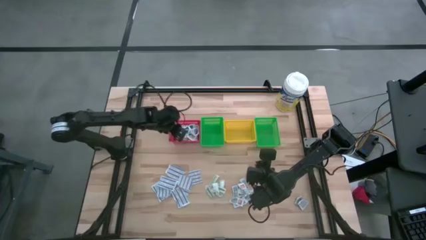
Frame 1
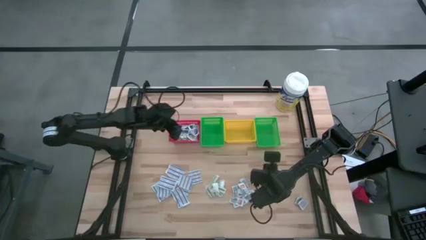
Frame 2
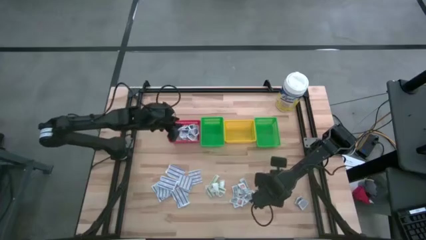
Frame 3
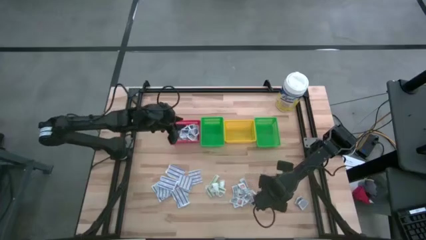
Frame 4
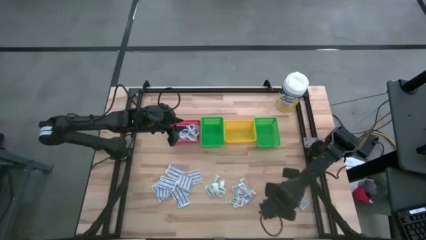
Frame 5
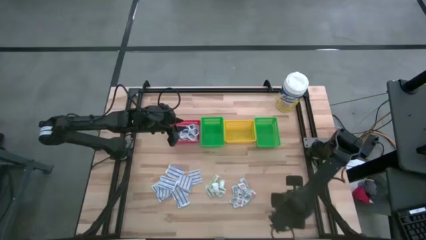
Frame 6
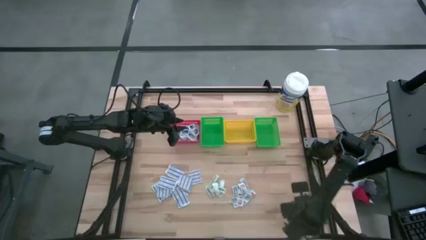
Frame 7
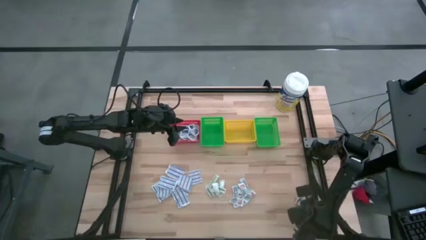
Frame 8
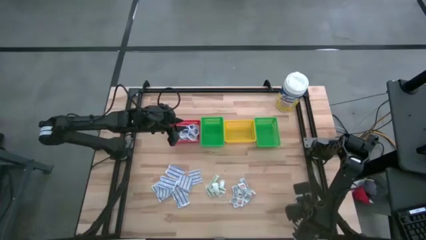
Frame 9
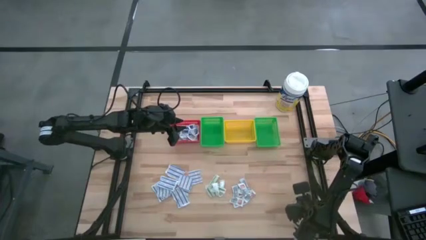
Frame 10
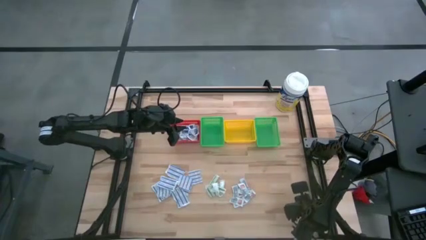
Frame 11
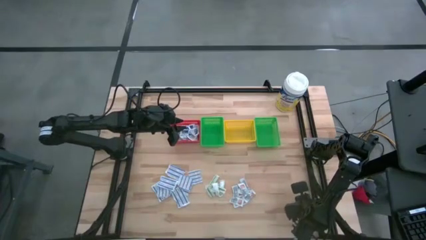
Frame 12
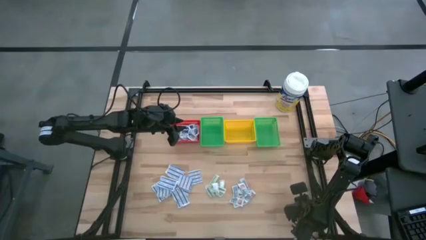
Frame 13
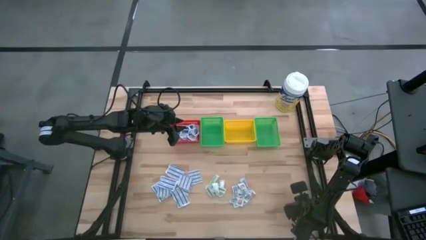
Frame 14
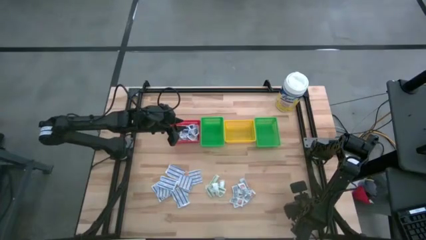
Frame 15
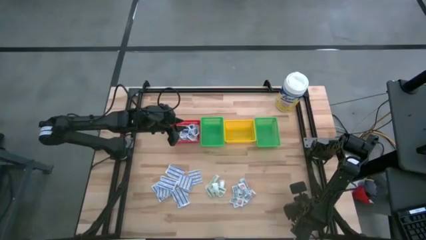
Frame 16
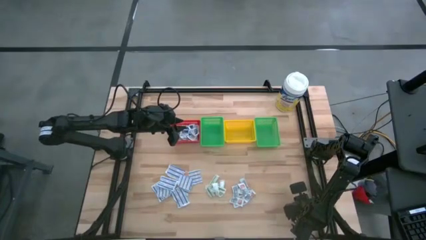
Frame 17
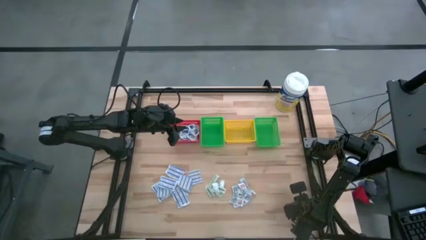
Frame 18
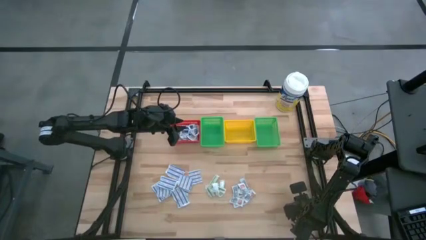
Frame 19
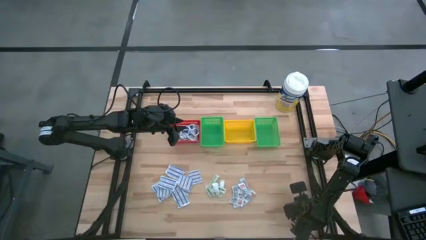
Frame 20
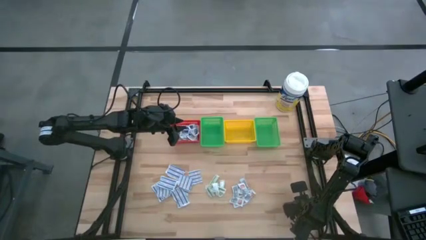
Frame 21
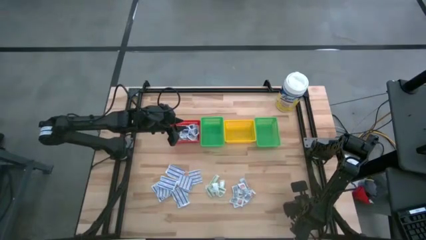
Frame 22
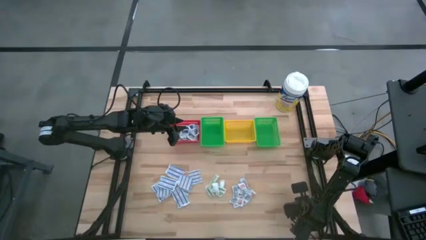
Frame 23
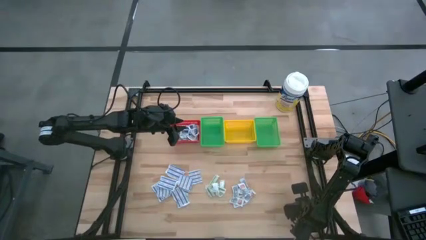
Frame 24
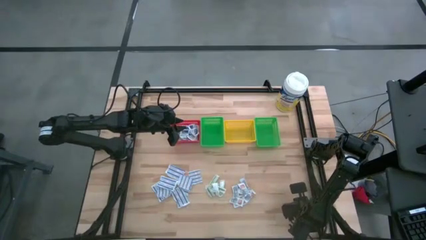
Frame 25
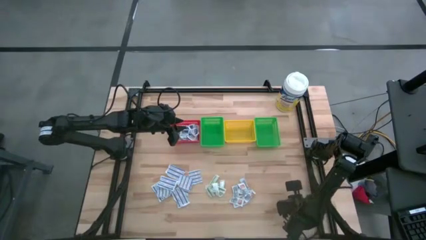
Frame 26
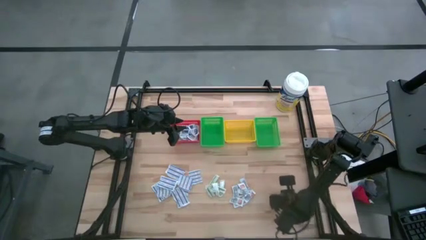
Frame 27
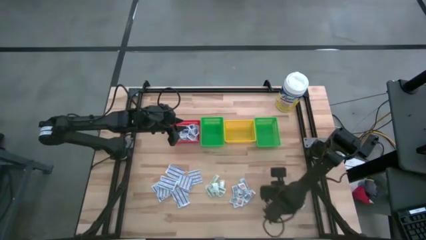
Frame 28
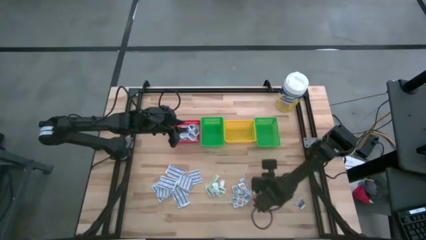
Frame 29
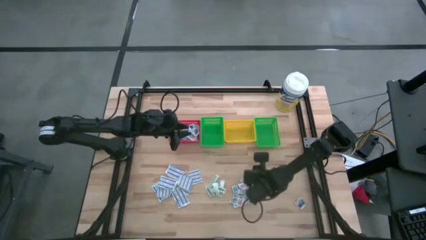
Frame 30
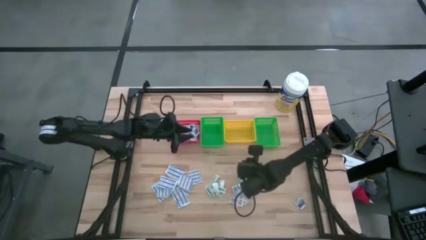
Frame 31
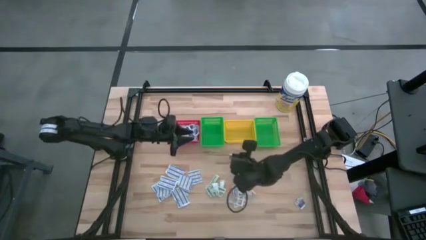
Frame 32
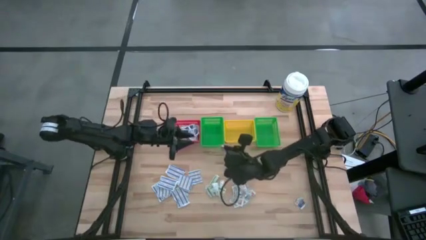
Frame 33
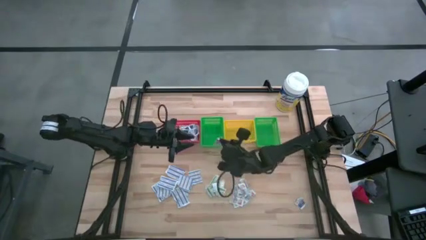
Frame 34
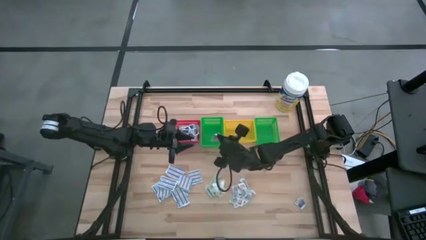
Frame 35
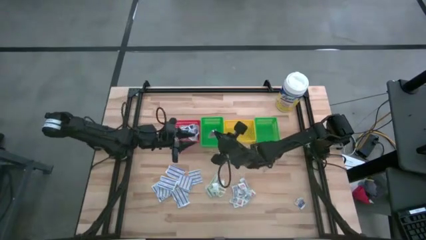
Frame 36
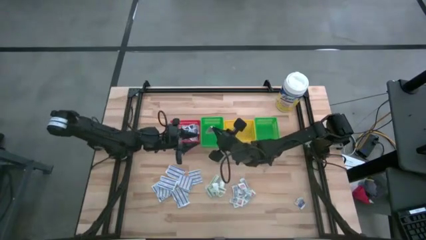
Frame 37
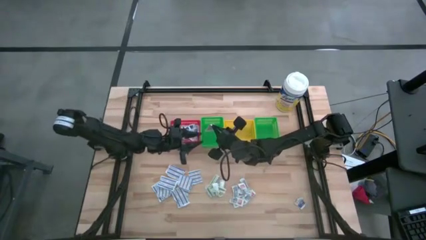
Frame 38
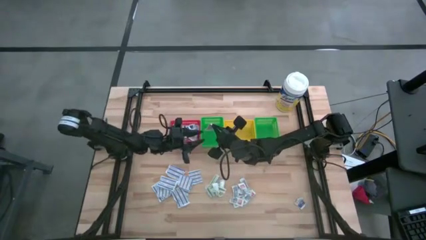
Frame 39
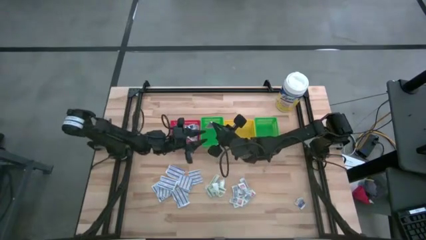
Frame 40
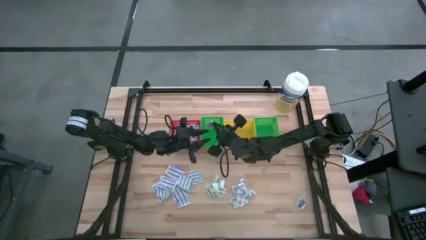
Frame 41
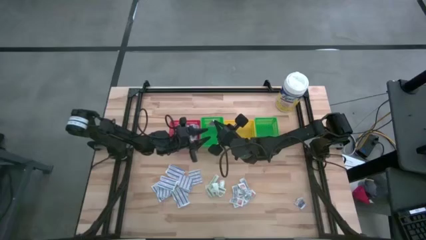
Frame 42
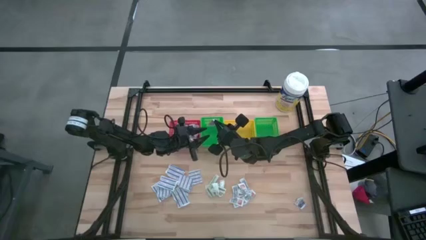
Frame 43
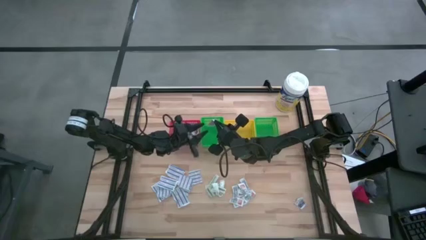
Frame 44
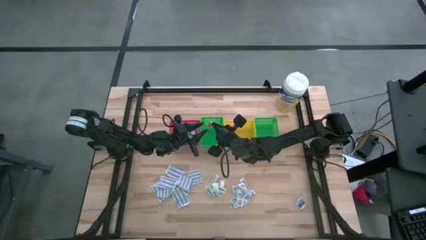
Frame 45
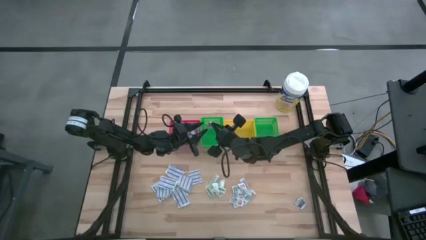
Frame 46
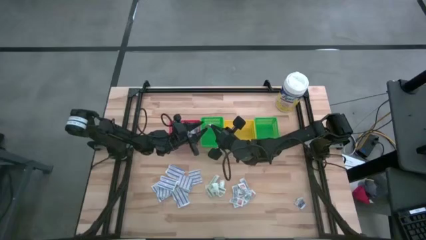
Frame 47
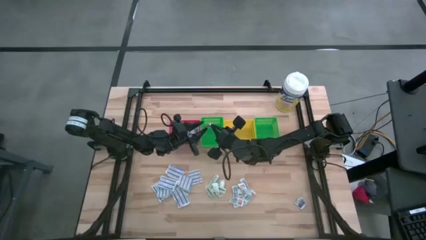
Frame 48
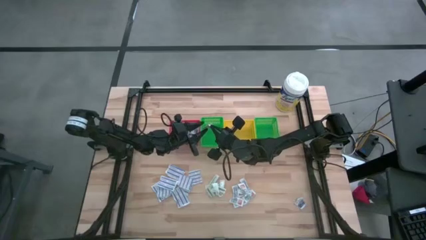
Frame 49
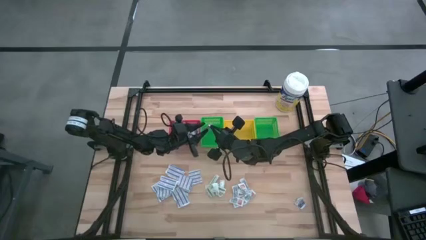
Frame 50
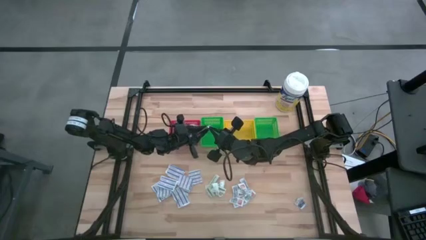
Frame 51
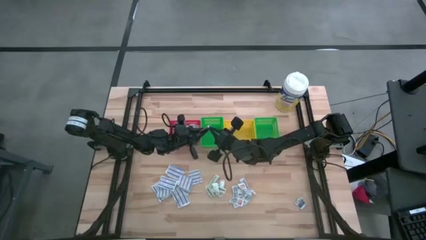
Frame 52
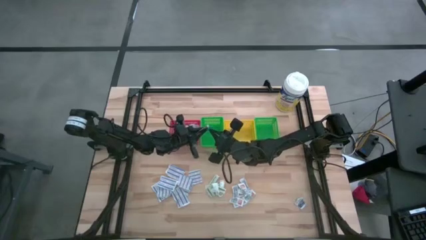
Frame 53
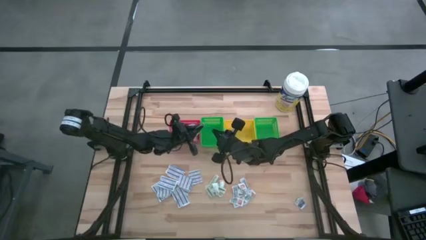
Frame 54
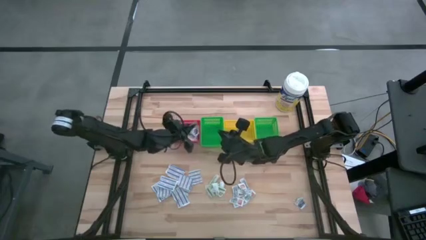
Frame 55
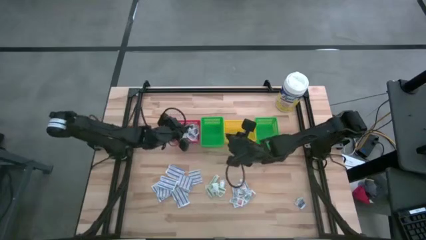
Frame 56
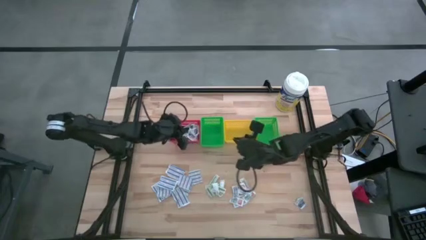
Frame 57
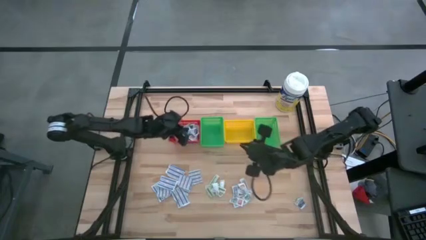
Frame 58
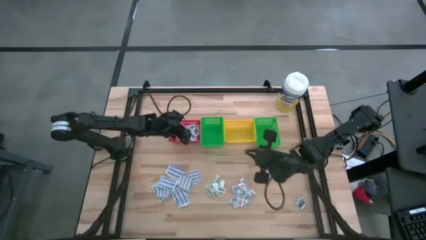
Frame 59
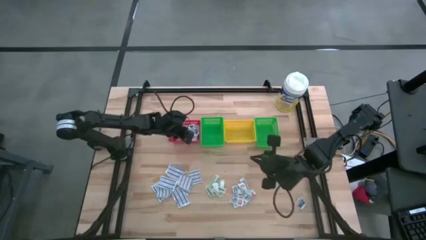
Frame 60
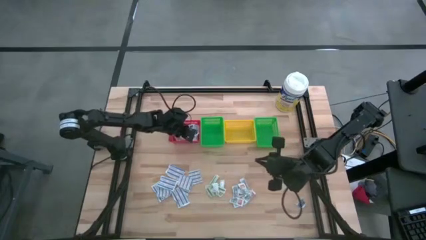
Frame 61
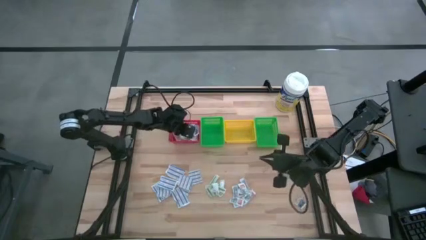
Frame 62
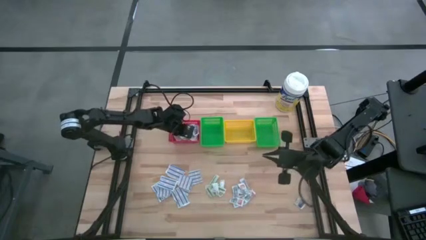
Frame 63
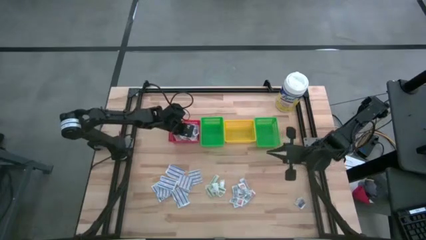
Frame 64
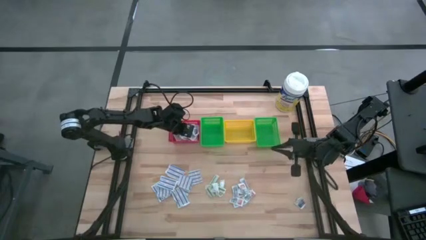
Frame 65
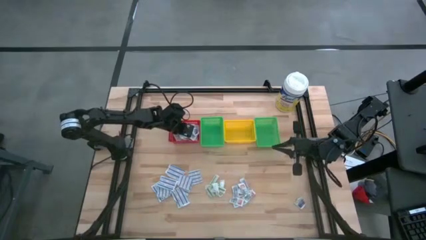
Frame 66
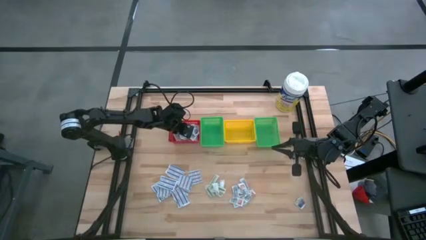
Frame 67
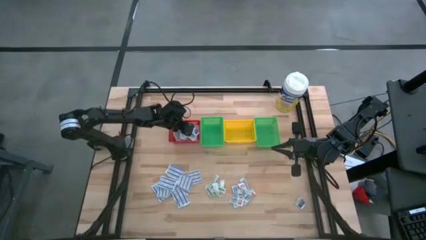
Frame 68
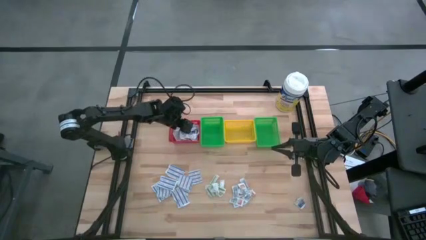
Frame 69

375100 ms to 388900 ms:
Task: Pick & Place First Aid Supplies
Put the alcohol pad into the red basket

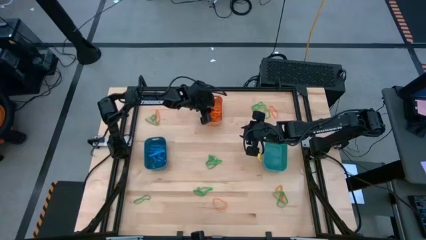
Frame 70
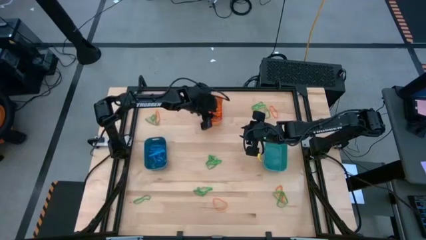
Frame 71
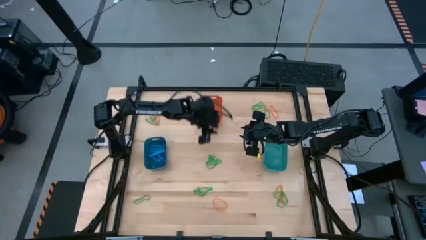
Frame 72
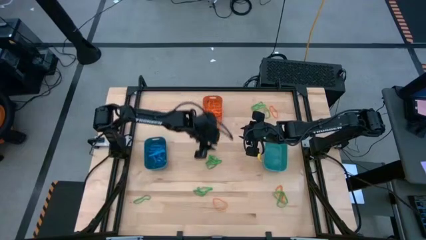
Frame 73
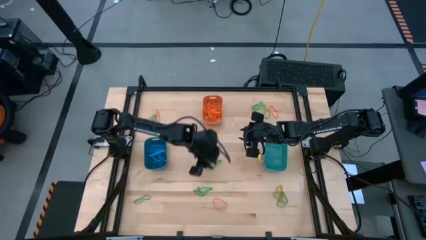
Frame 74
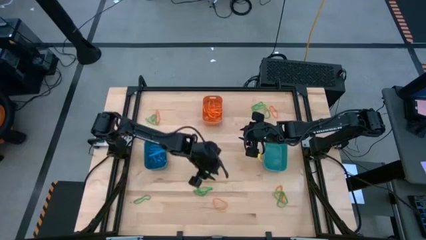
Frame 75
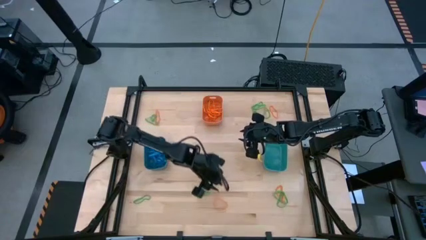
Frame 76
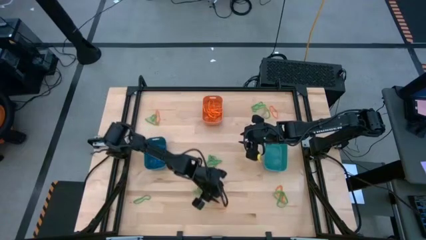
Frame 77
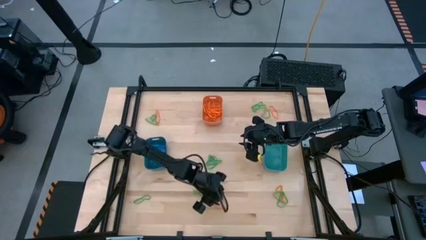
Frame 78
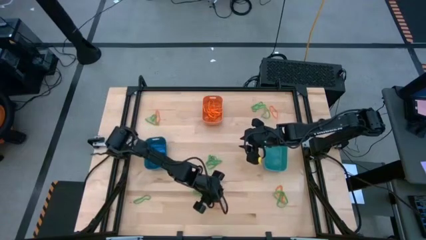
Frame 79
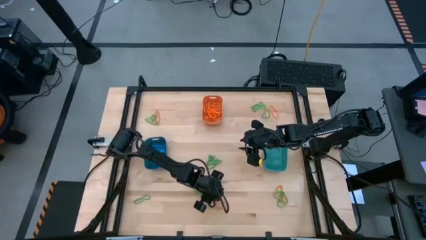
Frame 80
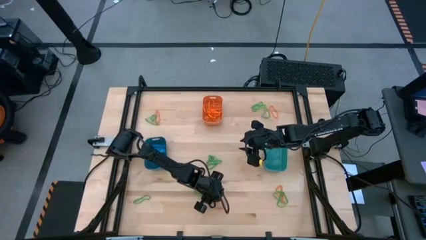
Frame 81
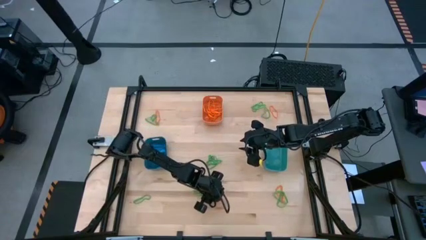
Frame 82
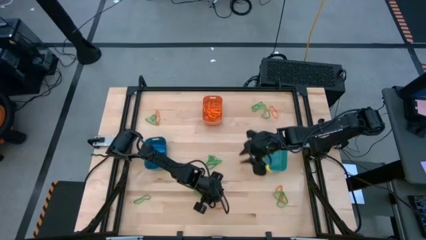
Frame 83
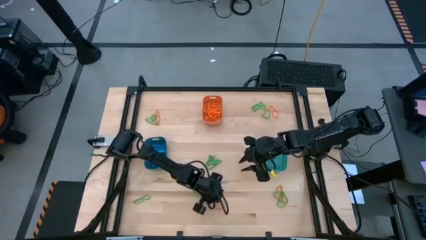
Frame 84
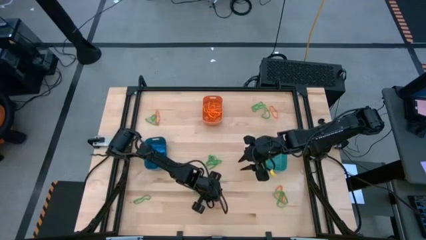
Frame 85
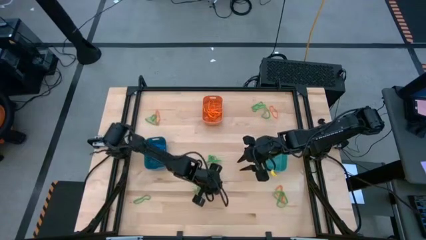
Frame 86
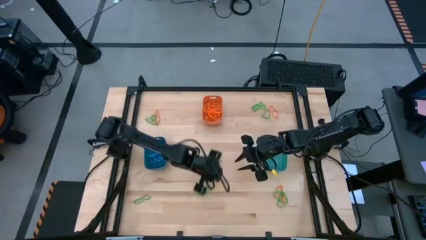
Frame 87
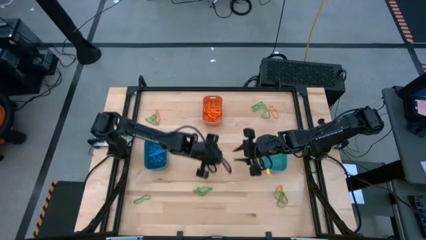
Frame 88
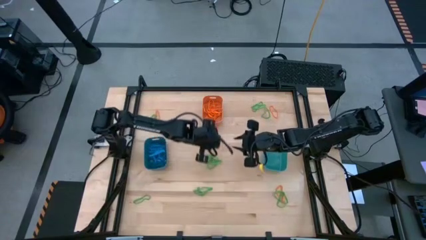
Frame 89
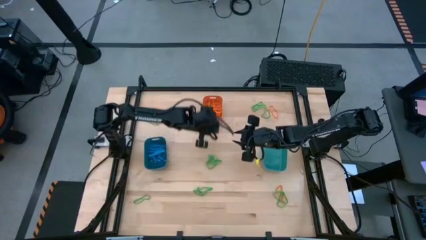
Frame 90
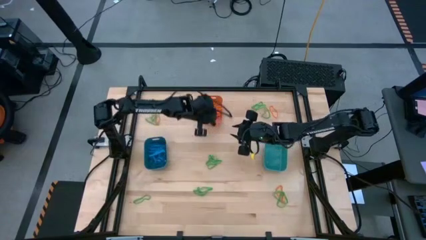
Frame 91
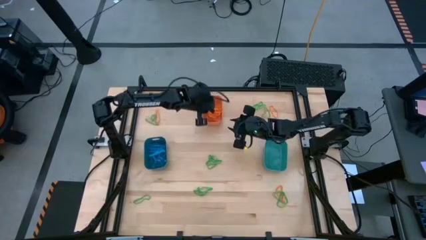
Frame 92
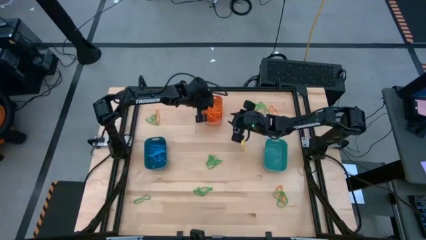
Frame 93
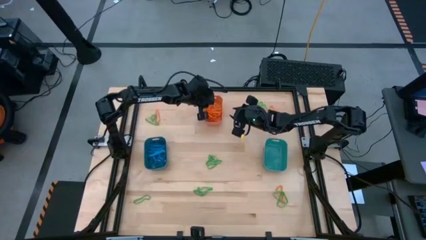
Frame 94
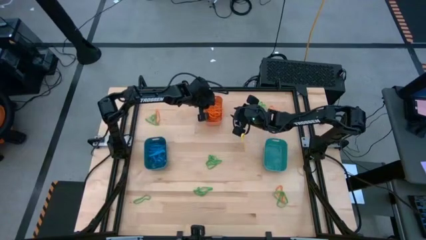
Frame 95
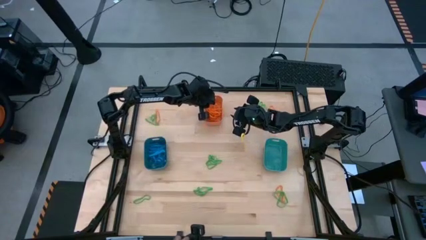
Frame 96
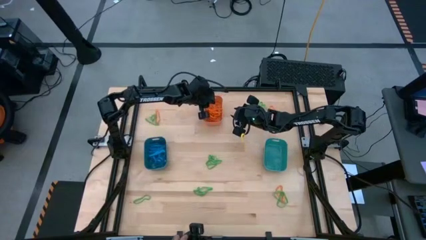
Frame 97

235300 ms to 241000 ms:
Task: Sort rubber bands into baskets
Put the orange rubber band into the orange bin
